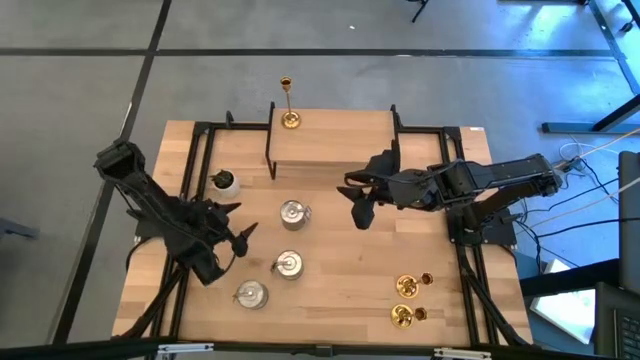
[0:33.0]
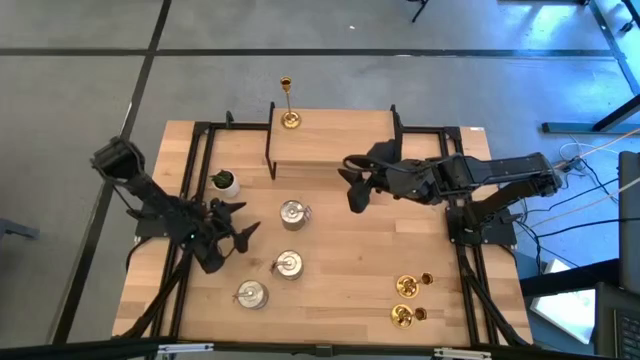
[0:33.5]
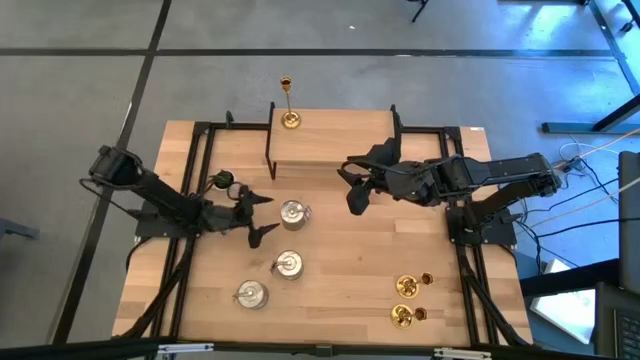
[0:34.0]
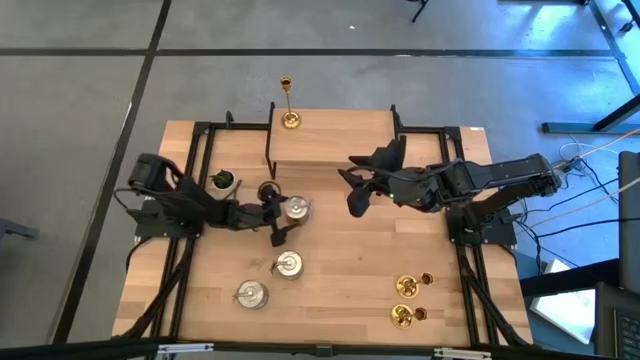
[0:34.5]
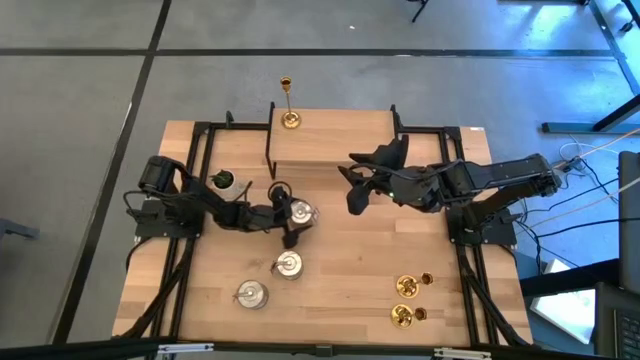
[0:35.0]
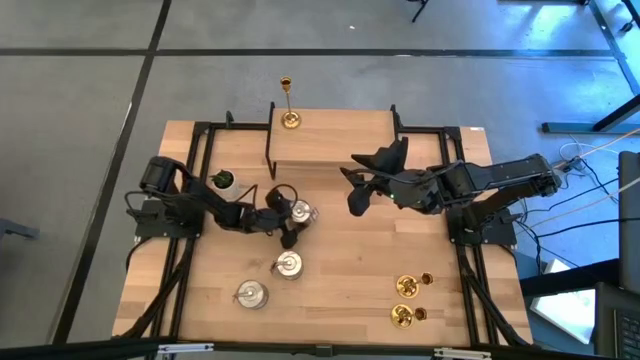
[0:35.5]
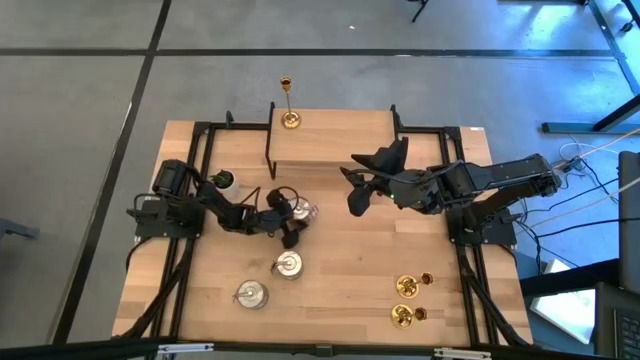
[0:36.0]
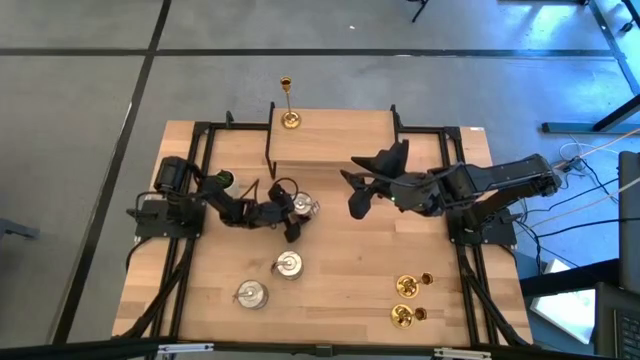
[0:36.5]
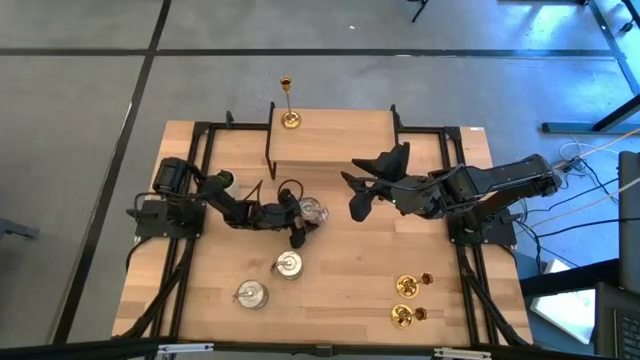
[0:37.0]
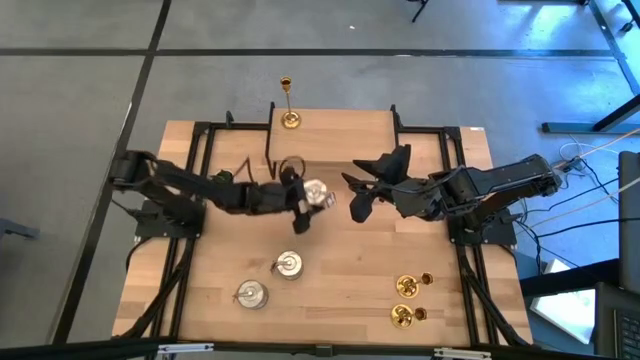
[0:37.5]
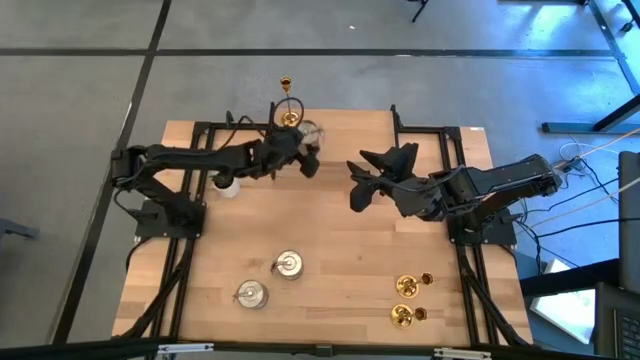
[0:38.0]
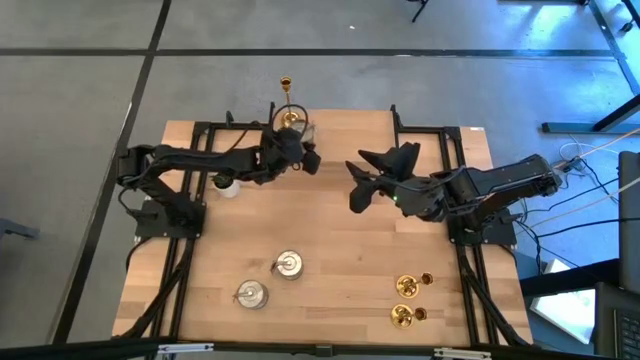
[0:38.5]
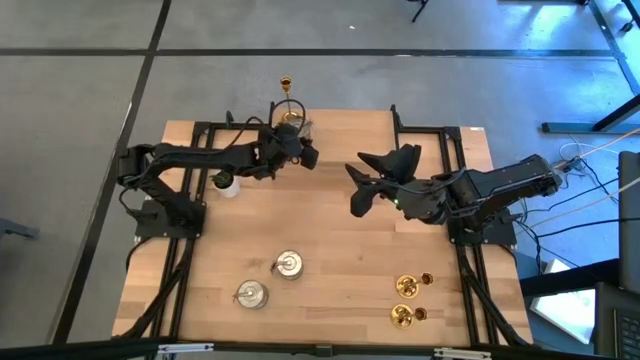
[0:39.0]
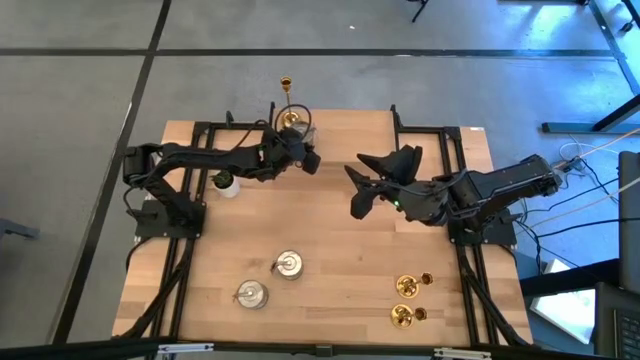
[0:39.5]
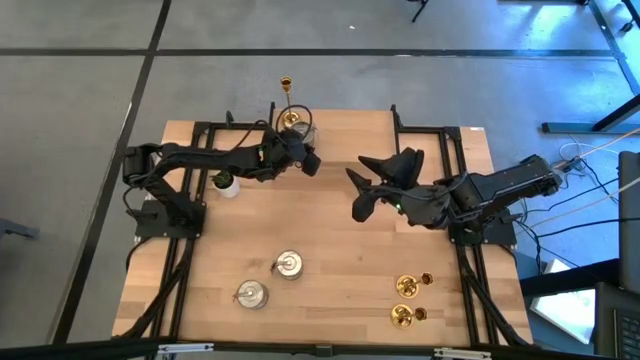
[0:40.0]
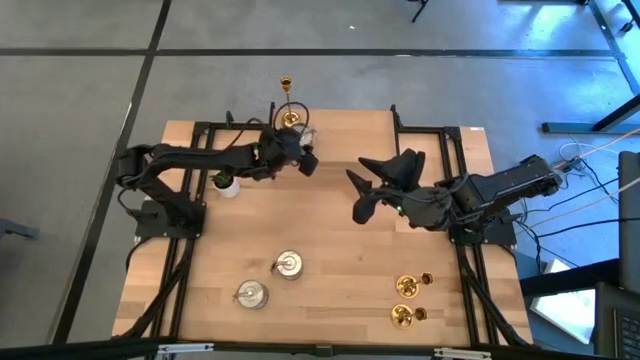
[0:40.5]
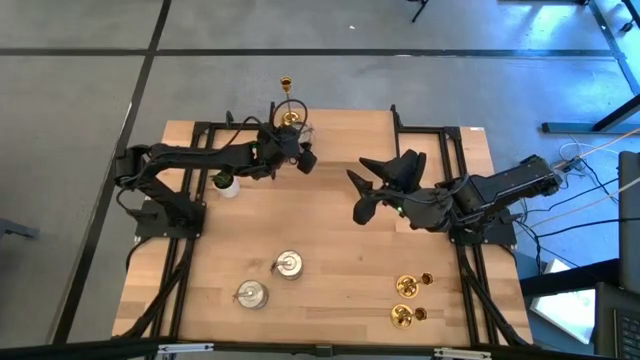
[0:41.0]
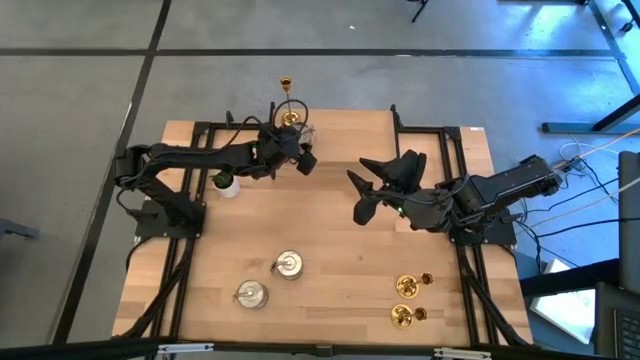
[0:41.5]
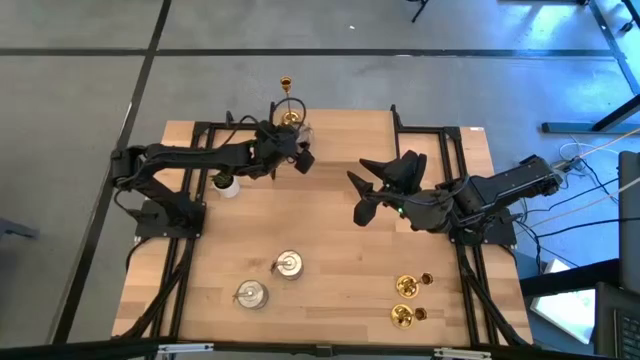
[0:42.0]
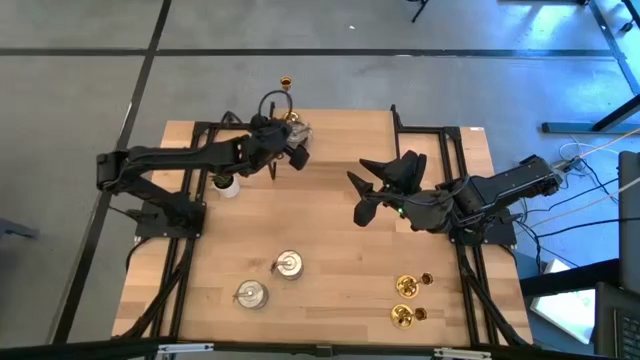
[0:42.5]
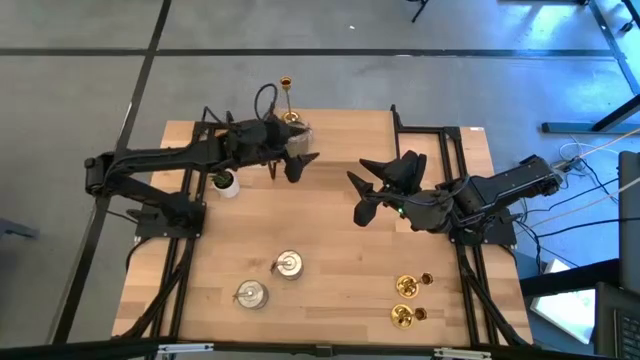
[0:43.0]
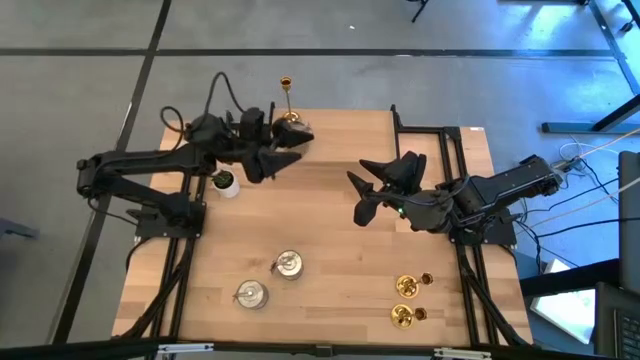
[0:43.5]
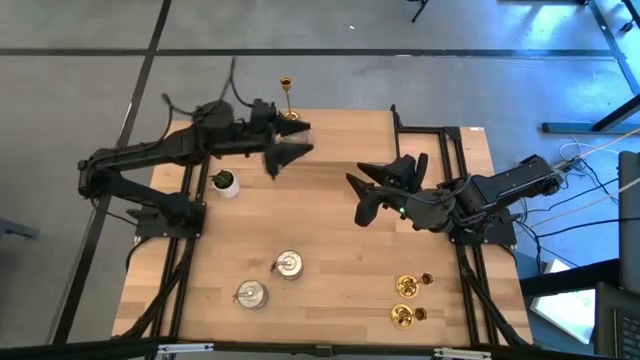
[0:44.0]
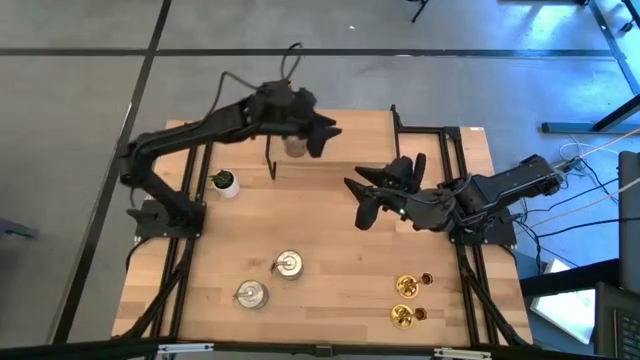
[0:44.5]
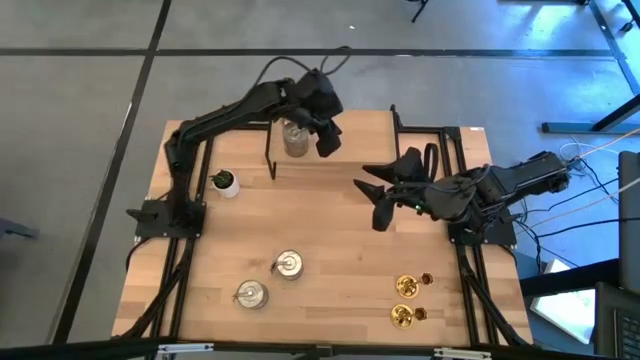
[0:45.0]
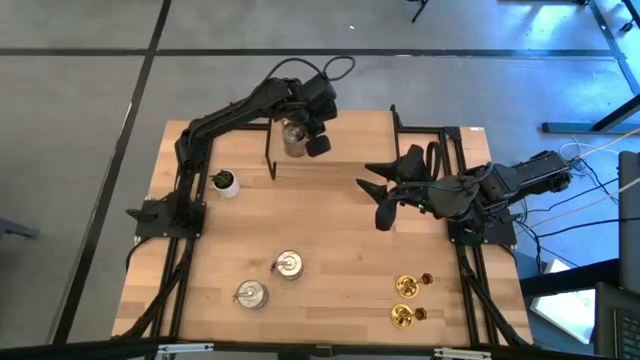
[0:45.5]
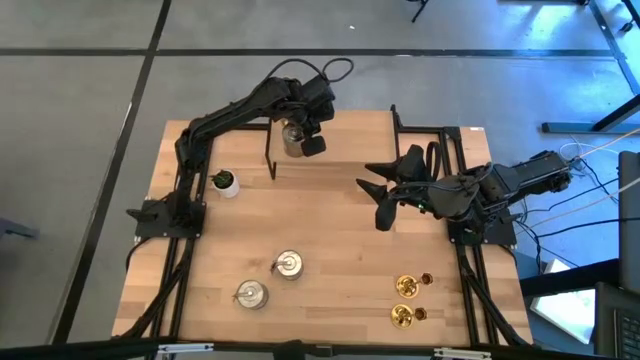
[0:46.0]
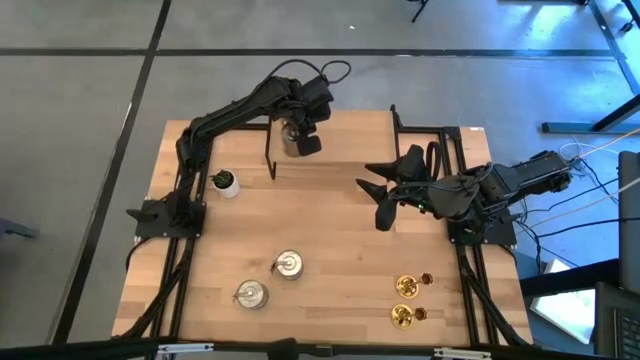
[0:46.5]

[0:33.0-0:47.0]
Task: Pick & Place candle stick holders
Put the top silver scented candle on the shelf

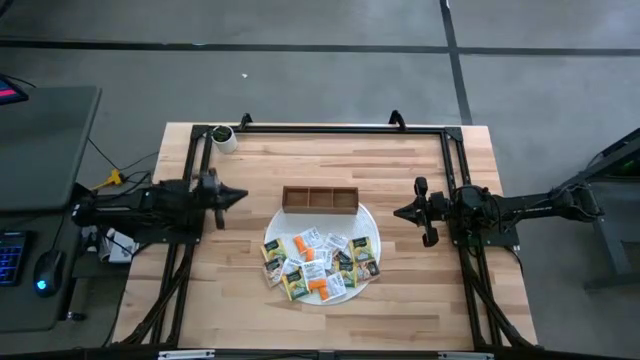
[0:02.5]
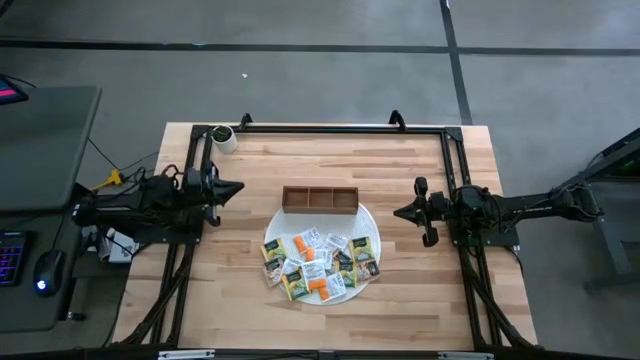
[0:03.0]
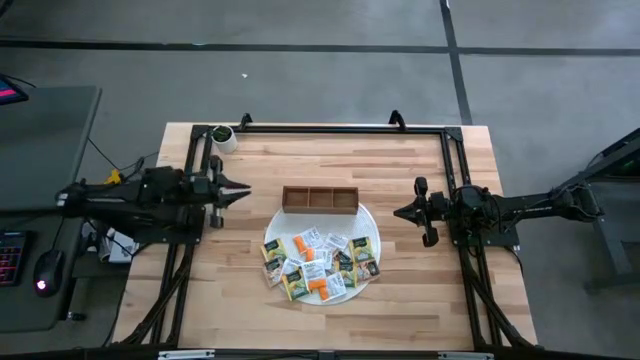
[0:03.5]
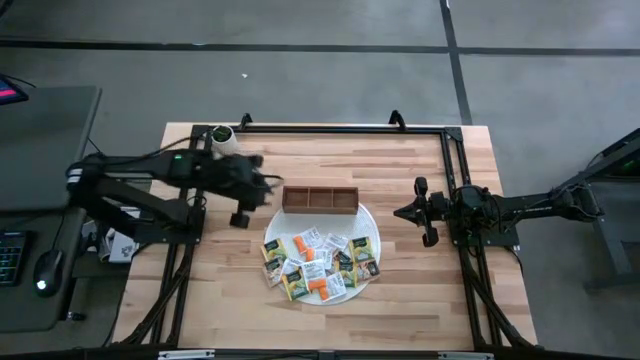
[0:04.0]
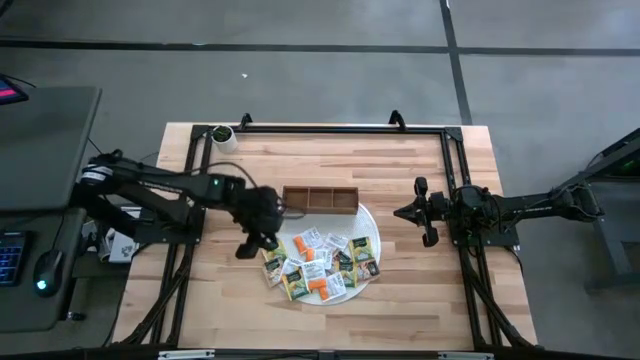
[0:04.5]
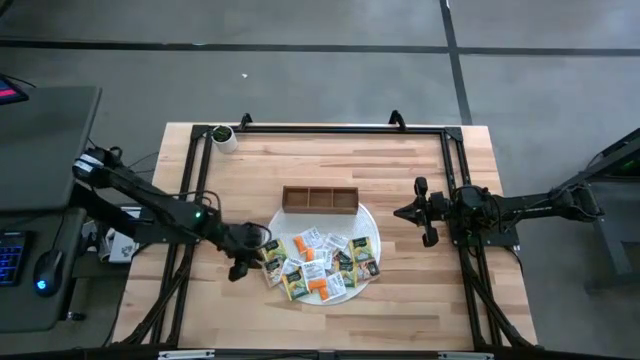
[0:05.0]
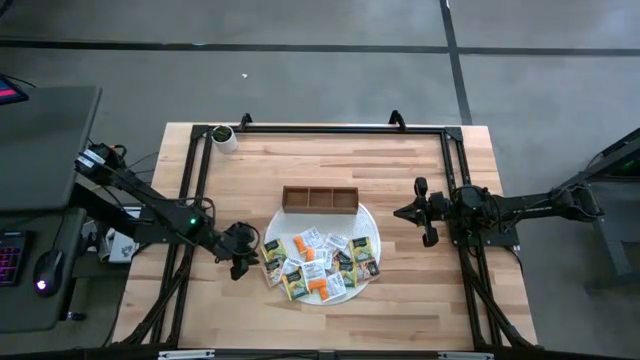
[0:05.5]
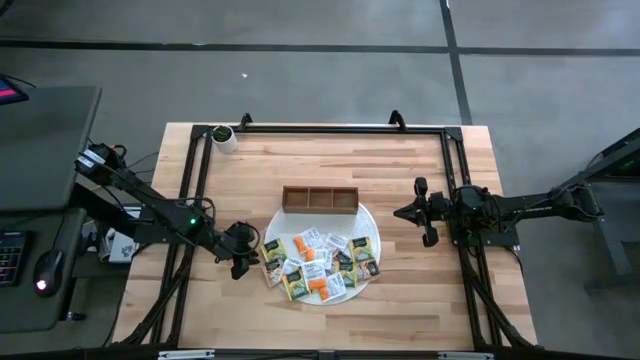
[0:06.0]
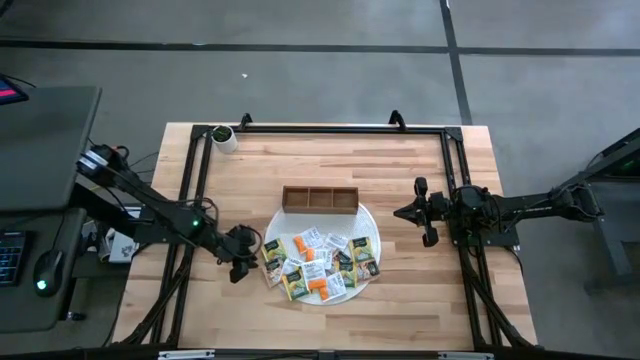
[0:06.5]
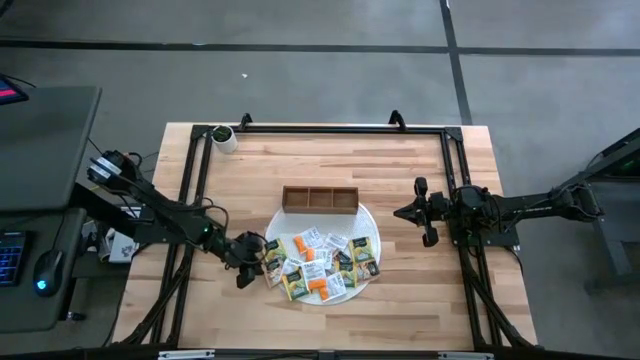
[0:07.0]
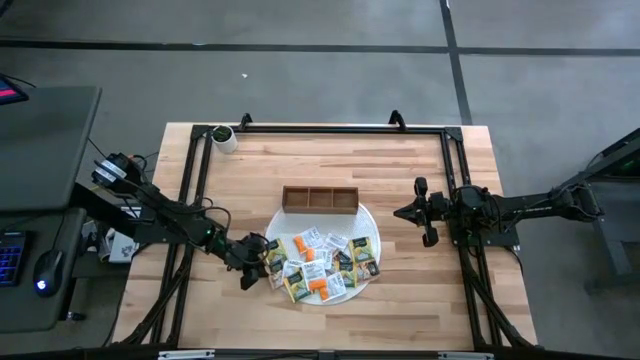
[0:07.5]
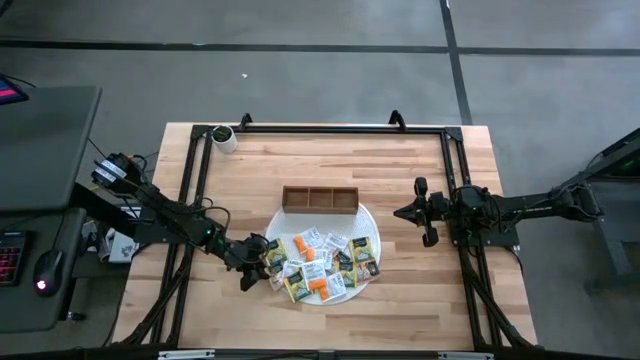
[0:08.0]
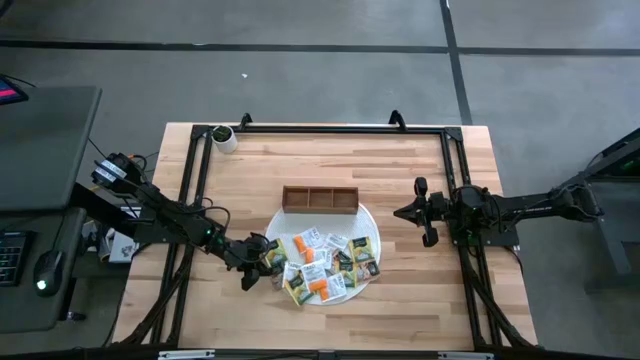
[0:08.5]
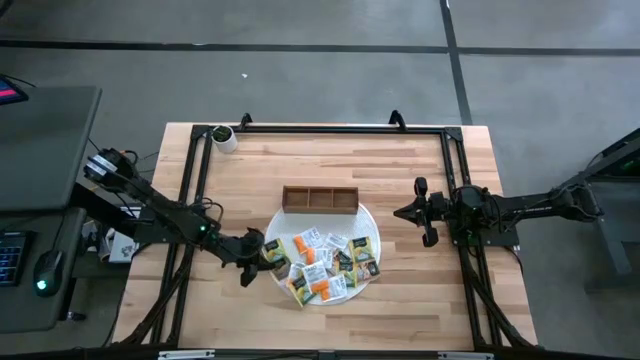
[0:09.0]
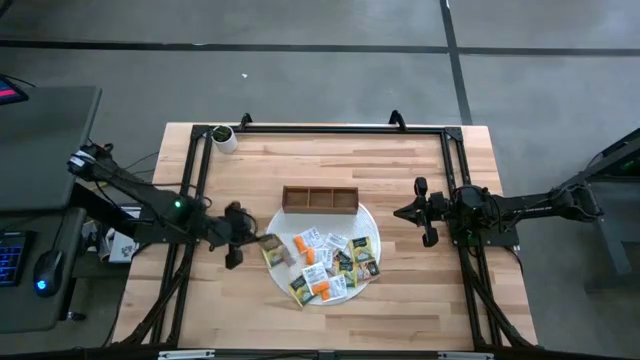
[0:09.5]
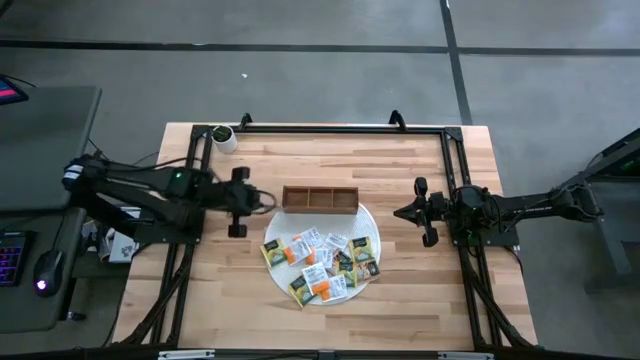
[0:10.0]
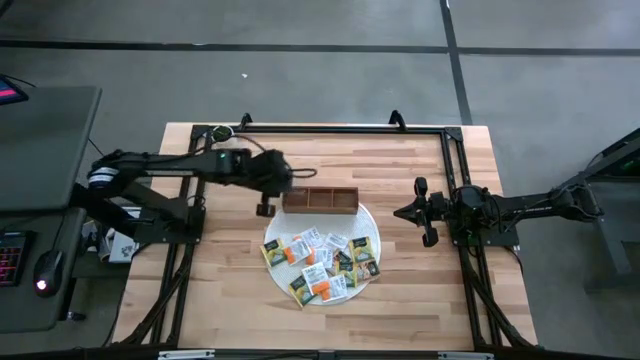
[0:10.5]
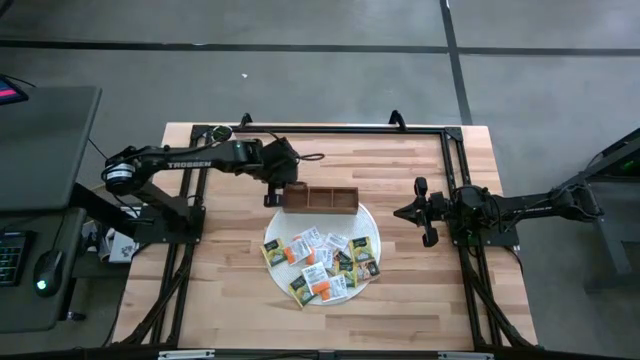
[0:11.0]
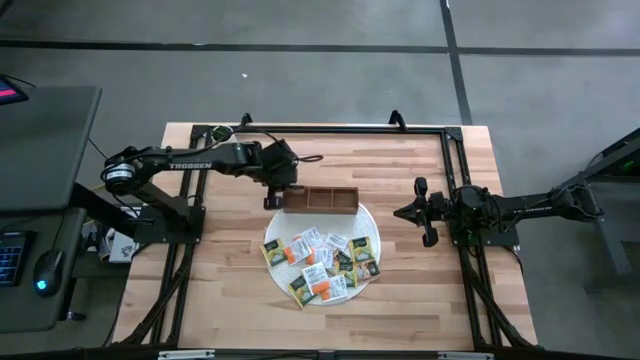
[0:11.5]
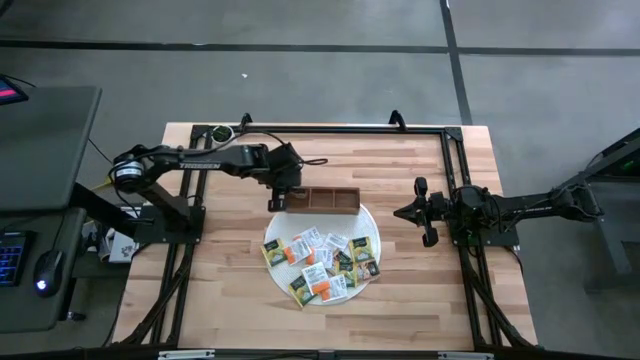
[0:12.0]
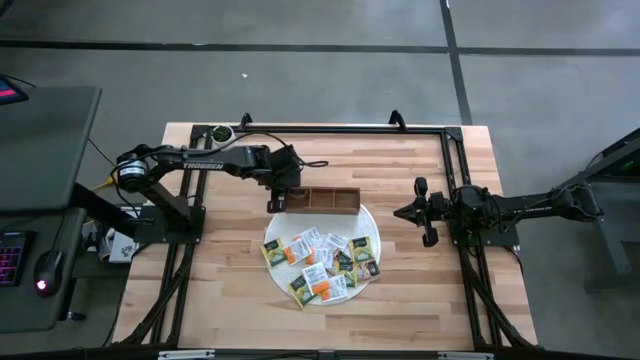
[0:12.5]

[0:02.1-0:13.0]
Task: Pick & Place Tea
Put the brown tea bag into the left section of the wooden organizer
